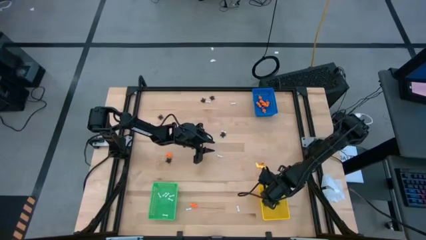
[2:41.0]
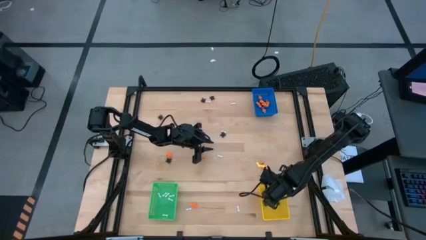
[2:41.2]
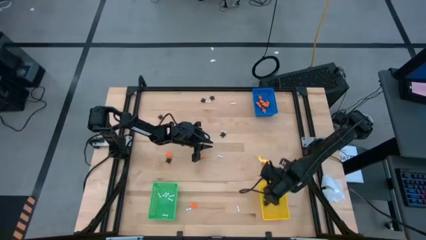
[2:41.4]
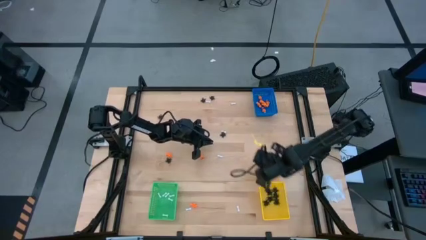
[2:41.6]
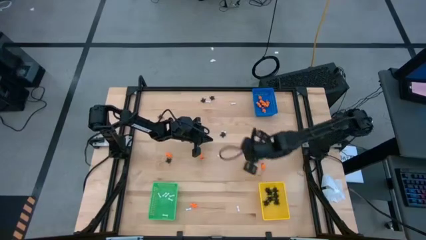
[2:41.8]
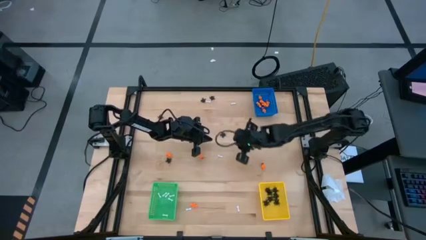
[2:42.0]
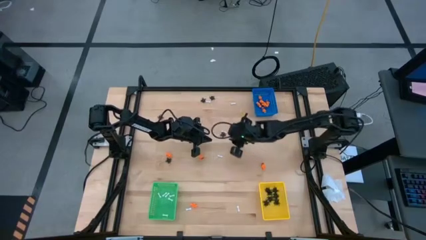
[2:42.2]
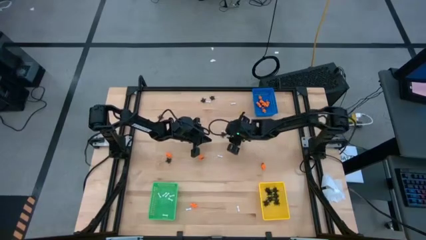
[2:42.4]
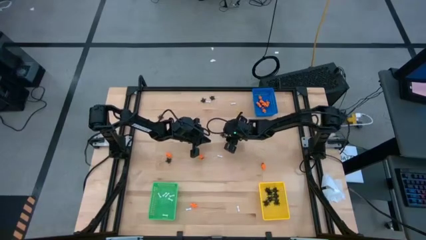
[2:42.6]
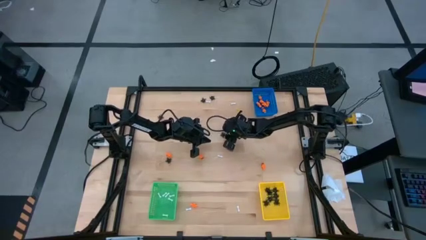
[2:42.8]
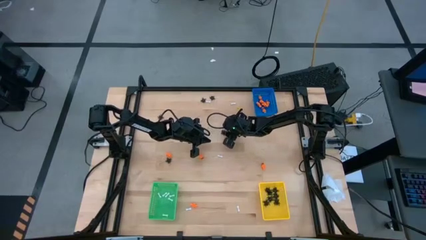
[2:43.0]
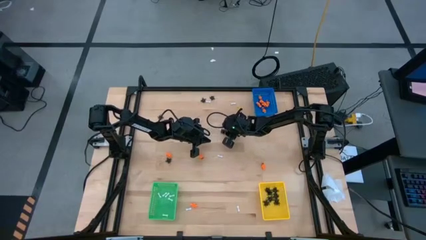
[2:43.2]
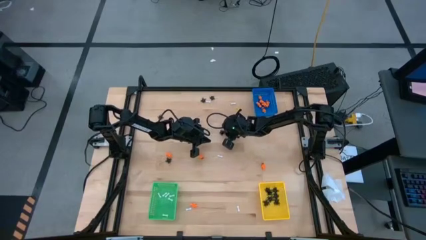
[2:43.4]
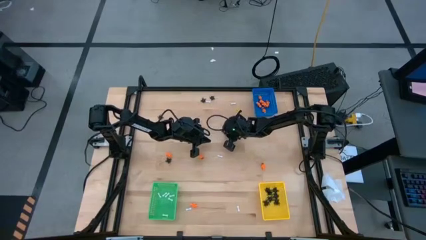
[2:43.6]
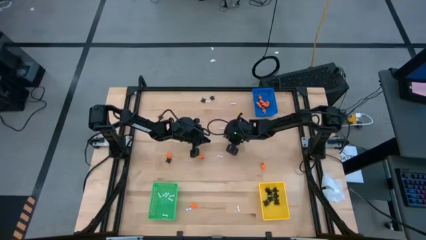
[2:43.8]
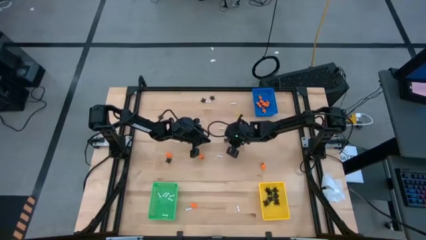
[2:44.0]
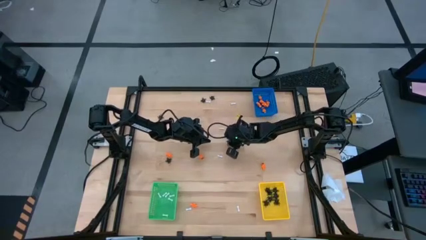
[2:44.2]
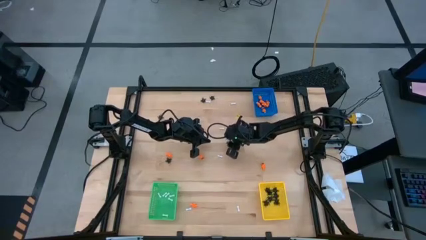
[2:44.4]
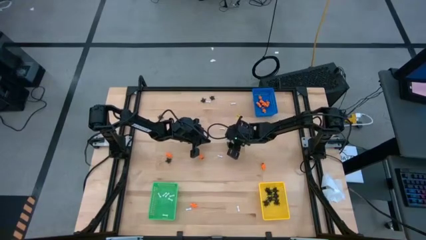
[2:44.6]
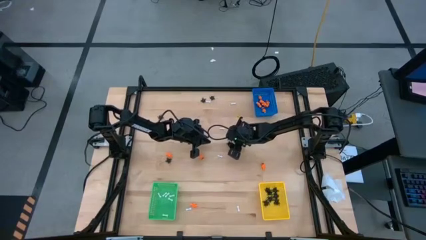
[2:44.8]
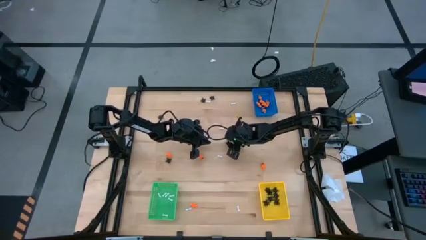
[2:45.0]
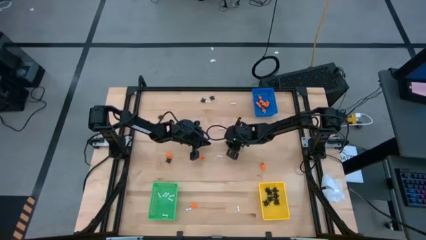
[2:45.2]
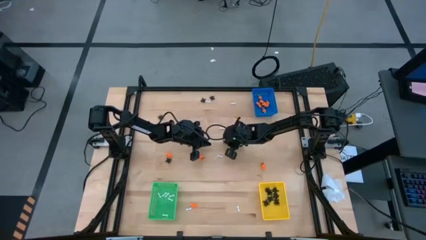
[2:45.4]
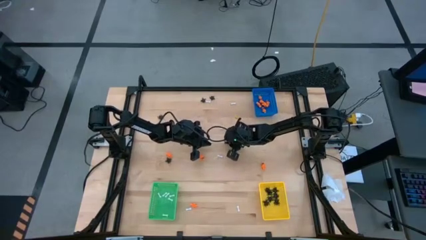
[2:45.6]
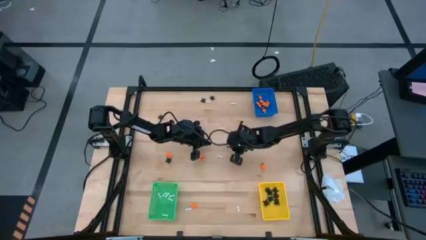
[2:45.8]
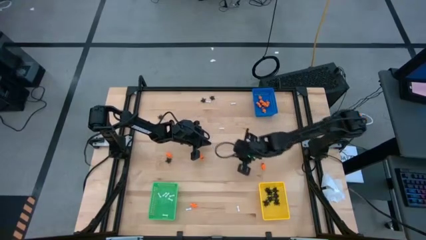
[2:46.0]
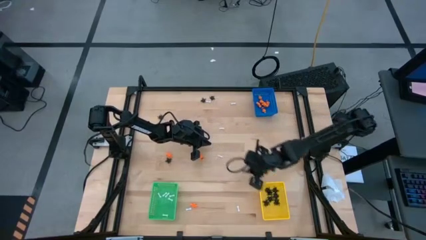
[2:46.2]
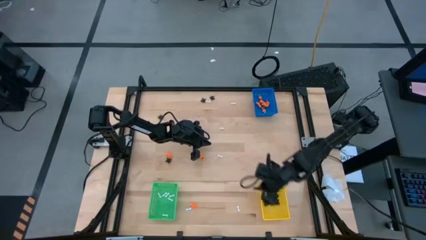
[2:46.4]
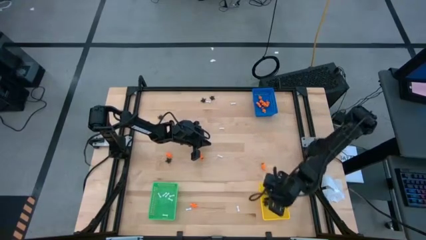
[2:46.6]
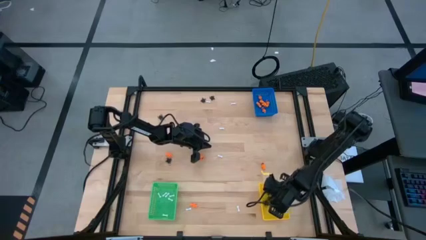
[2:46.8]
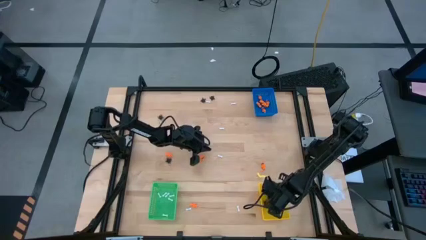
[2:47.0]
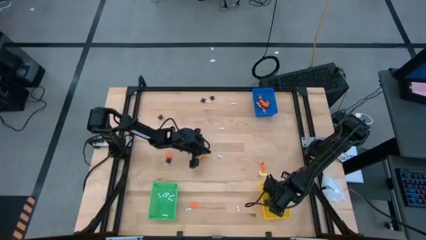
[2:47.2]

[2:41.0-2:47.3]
Task: Sort Halloween decoration
Put the black spider toy into the yellow bin

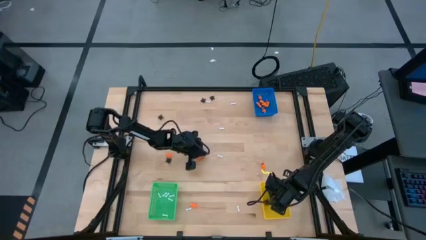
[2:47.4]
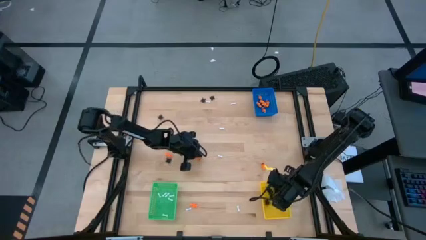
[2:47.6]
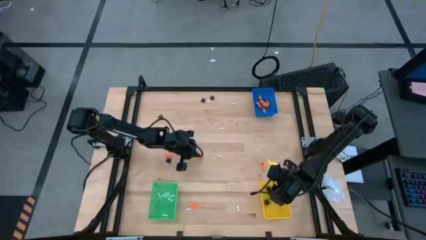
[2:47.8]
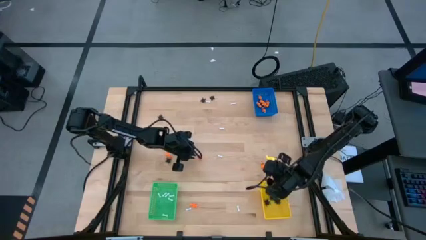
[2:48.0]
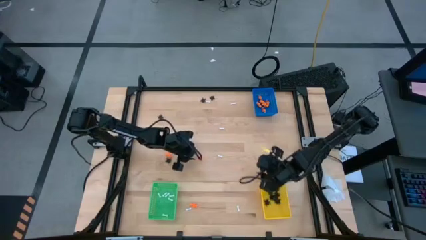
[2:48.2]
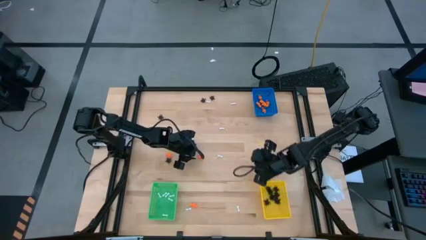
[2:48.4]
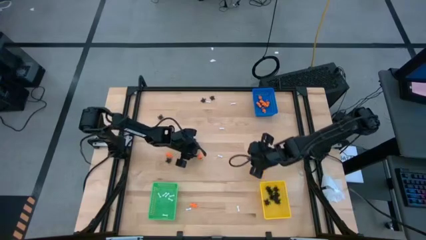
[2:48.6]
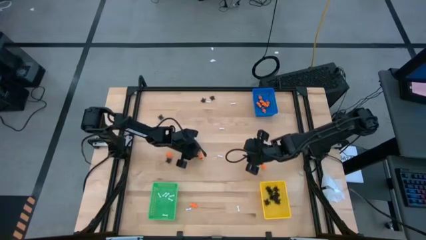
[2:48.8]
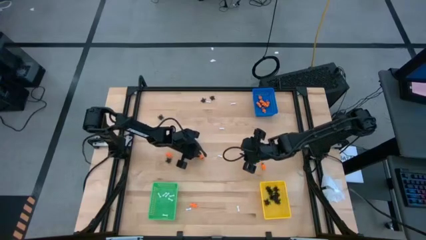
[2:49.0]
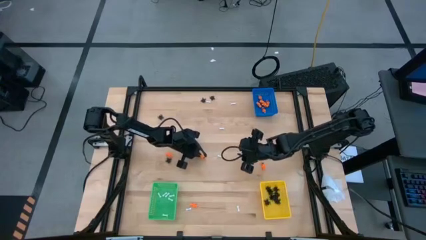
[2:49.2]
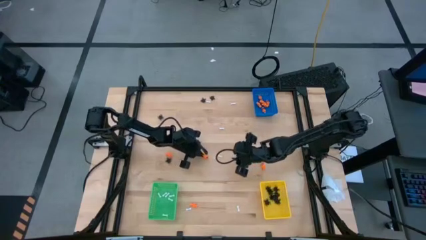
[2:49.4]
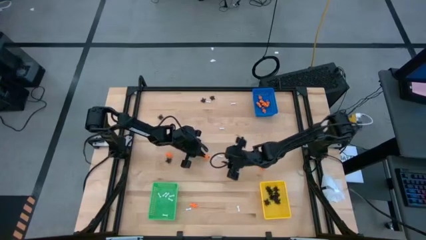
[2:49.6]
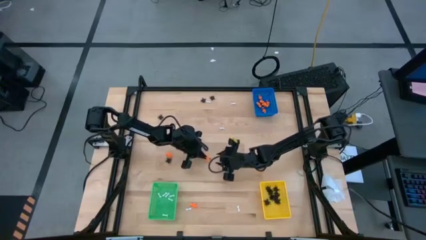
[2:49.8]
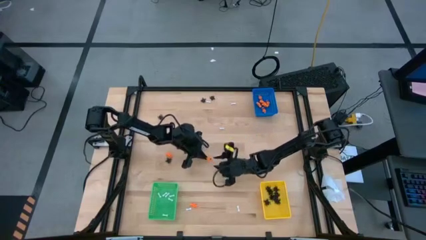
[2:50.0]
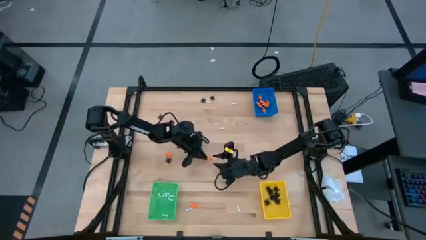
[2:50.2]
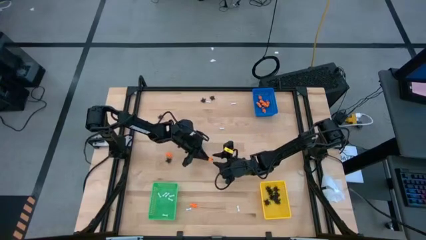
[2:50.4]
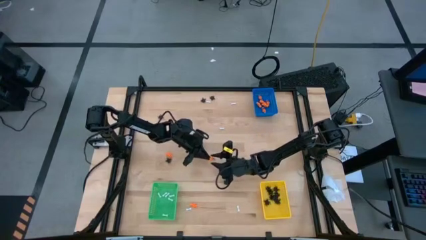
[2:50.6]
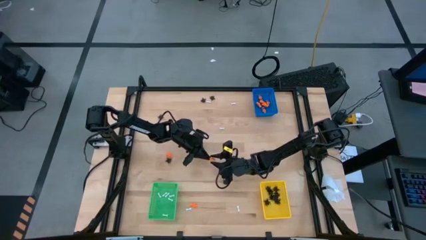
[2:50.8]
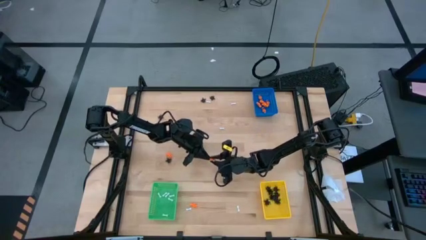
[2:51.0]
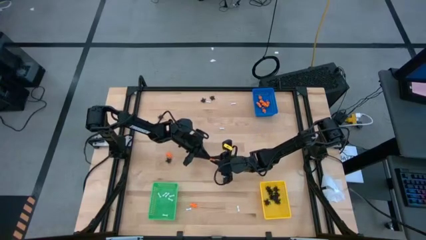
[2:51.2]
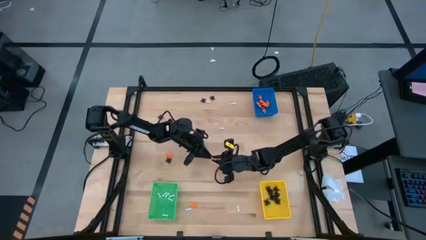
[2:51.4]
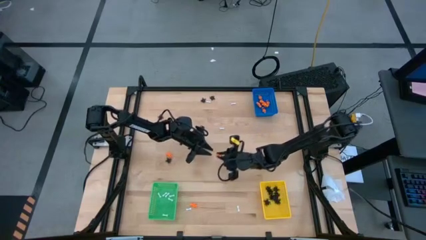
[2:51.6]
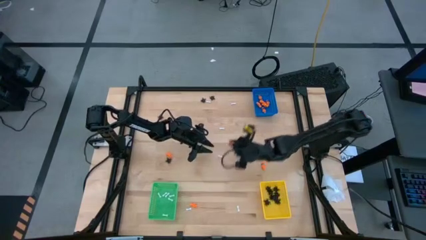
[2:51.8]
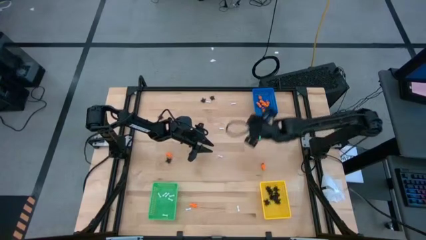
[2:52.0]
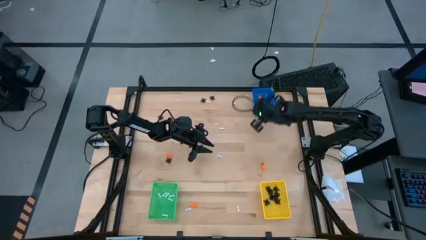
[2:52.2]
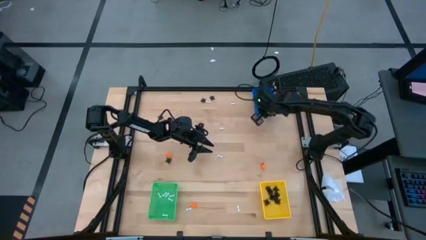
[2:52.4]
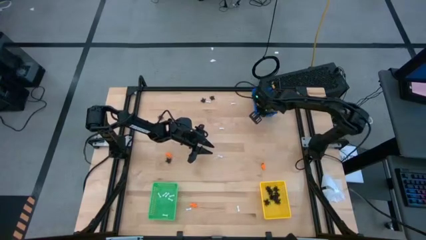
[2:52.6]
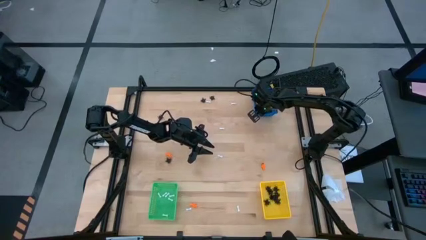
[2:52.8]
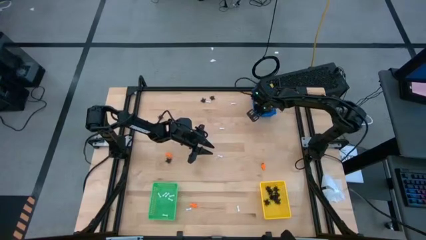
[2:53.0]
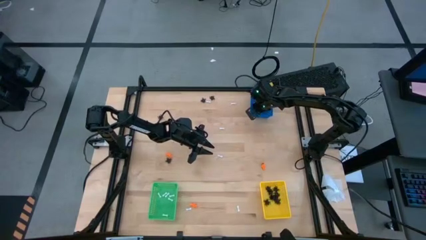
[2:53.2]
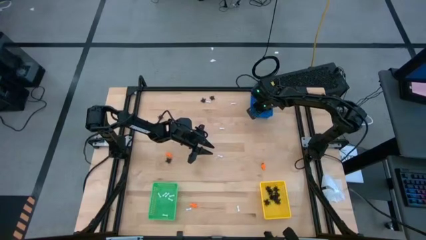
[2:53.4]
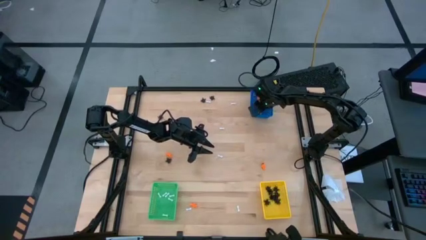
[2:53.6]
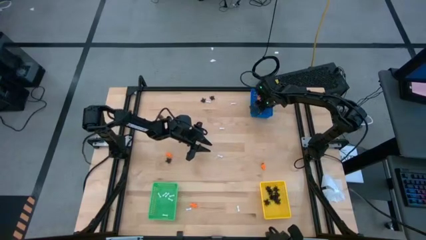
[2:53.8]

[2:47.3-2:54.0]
Put the orange toy skeleton into the blue bin

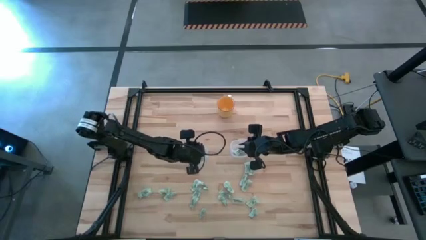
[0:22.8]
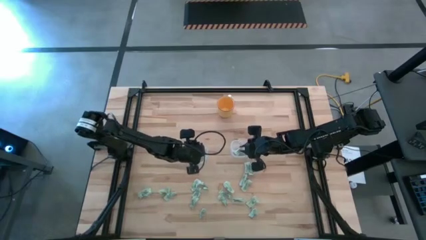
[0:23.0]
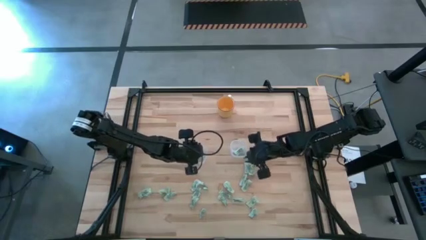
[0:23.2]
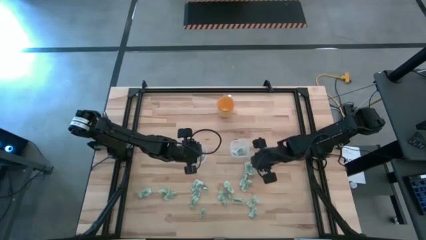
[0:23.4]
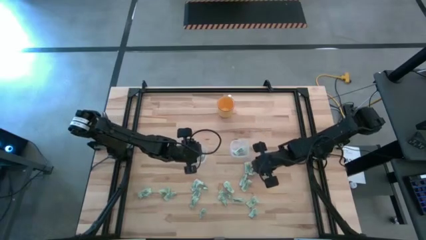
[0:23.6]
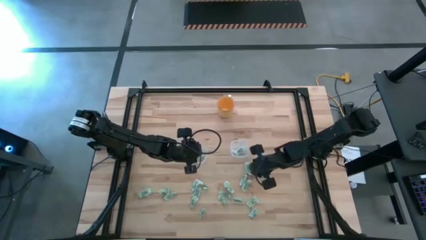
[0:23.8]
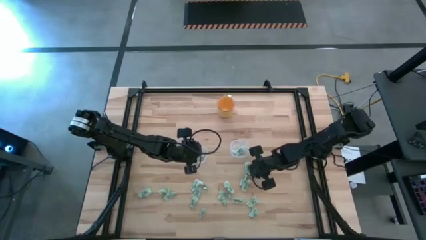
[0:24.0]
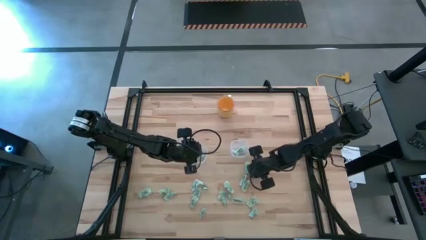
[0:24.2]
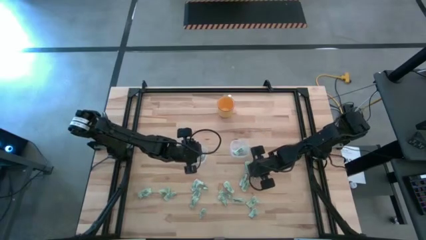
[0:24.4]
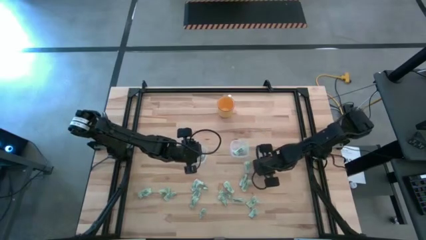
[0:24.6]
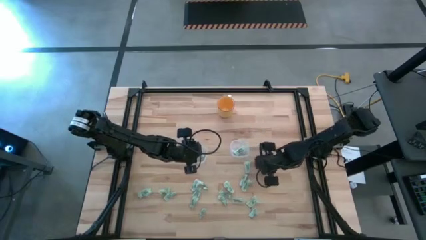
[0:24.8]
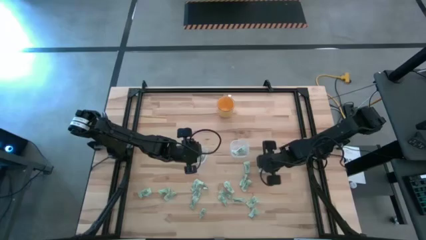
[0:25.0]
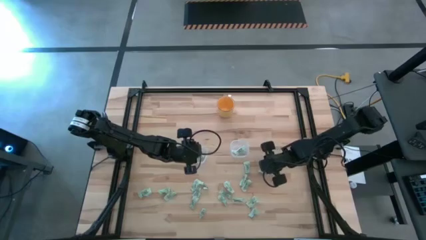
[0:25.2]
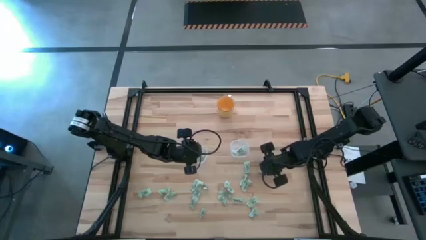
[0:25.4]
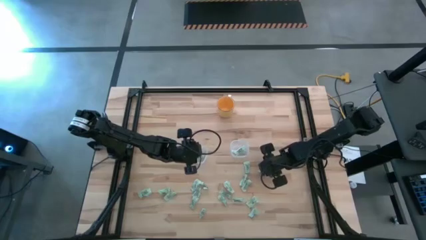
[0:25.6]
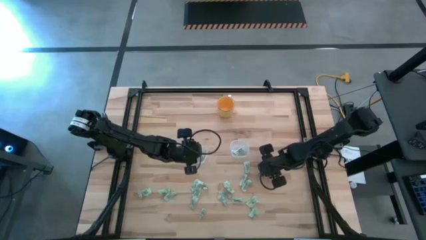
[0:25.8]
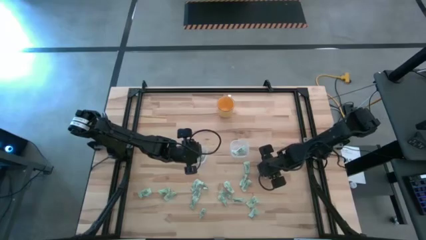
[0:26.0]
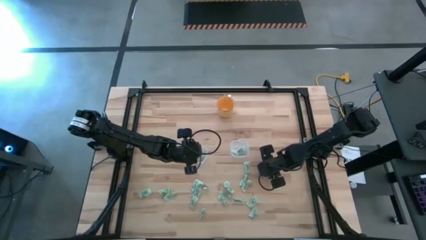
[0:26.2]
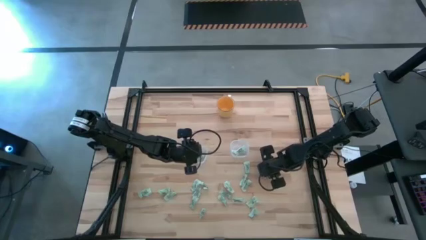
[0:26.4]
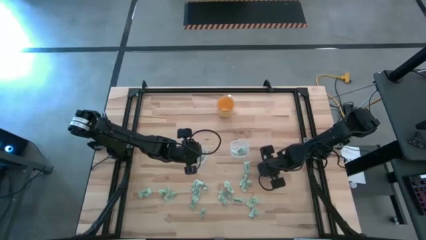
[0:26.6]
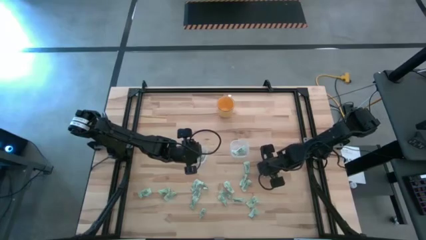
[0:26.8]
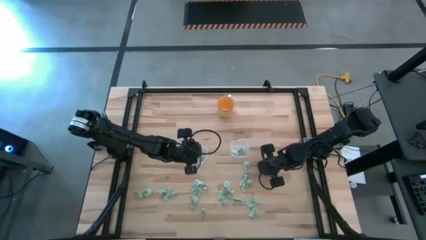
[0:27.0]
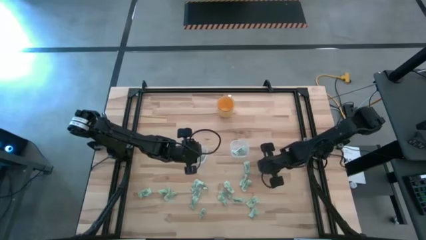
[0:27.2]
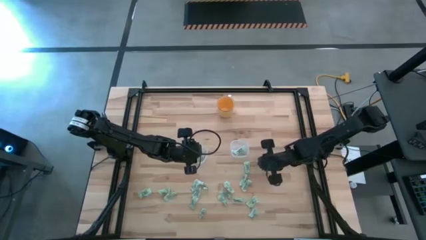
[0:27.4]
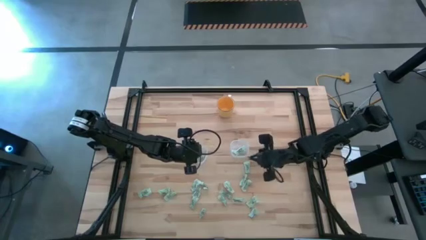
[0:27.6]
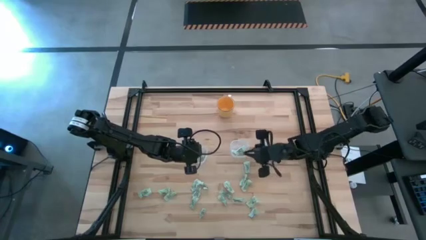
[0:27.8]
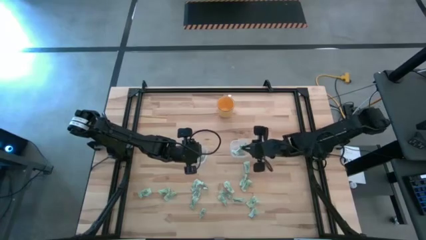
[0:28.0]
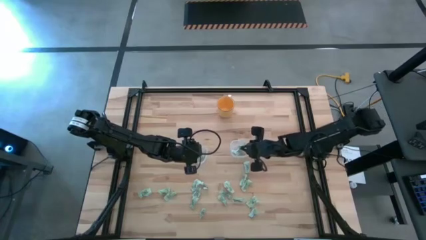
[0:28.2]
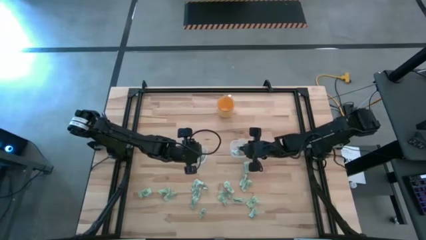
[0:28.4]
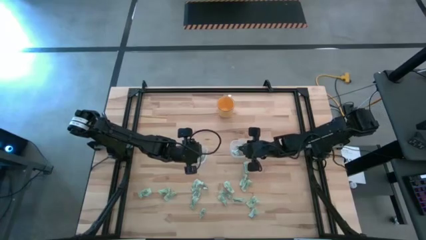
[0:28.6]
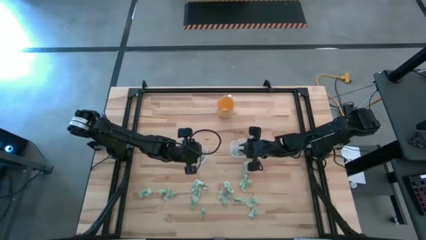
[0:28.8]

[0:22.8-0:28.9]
Task: Pick and place items into bin
Put the green sweetener bag into the right transparent food container
